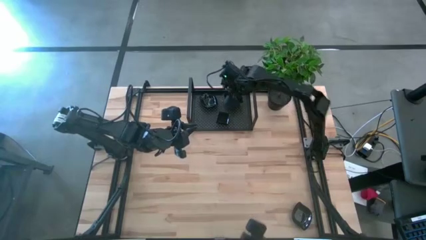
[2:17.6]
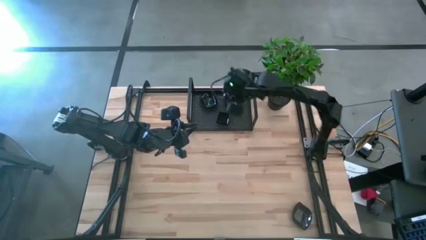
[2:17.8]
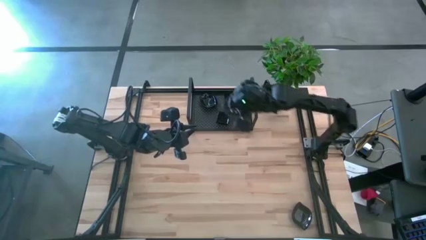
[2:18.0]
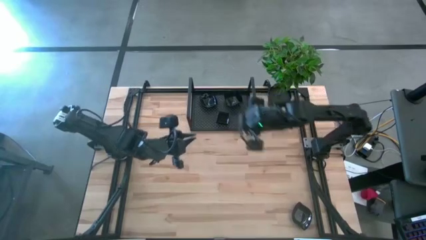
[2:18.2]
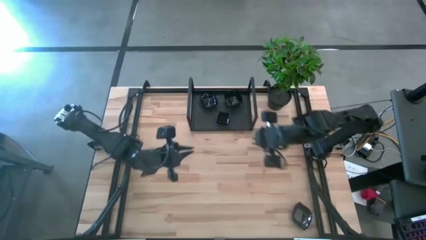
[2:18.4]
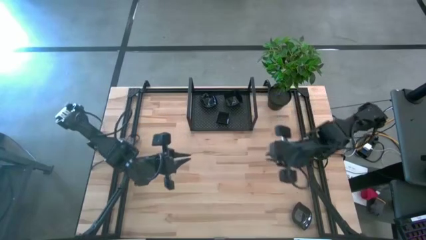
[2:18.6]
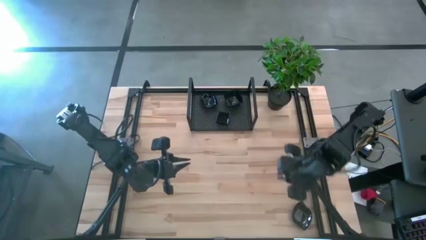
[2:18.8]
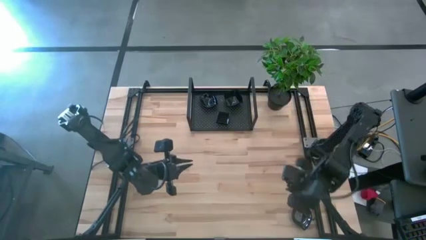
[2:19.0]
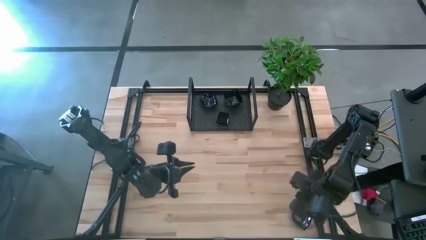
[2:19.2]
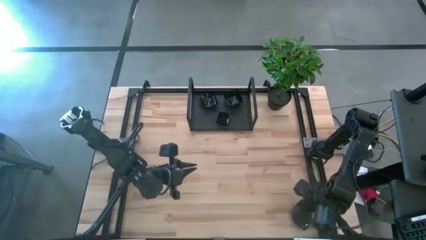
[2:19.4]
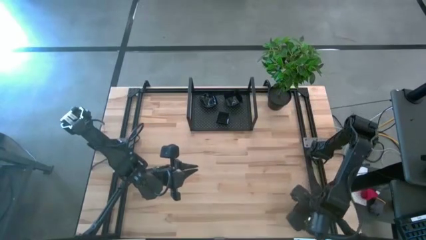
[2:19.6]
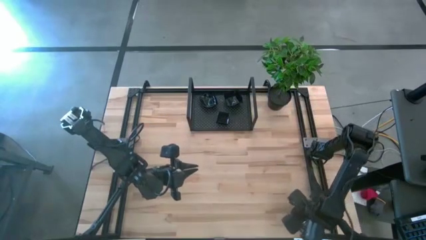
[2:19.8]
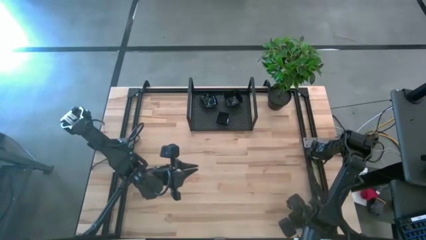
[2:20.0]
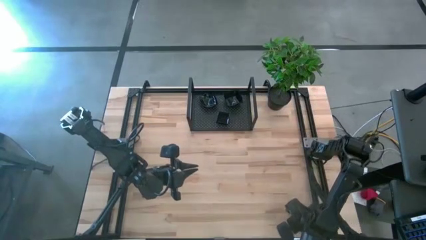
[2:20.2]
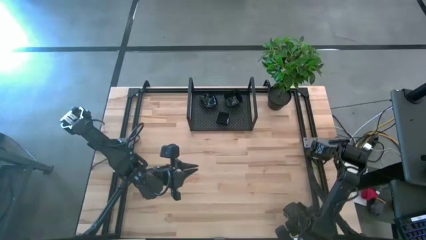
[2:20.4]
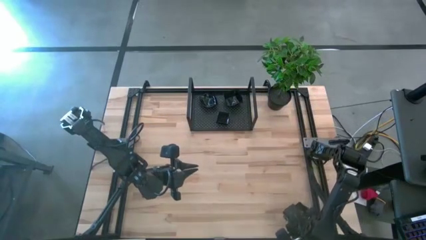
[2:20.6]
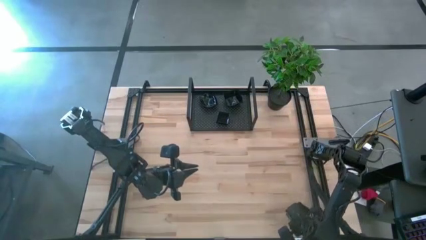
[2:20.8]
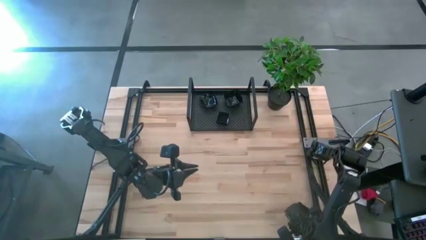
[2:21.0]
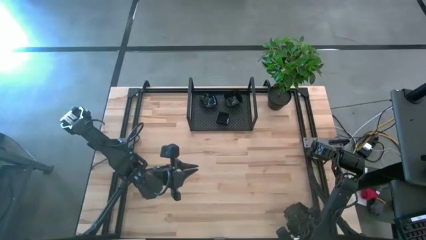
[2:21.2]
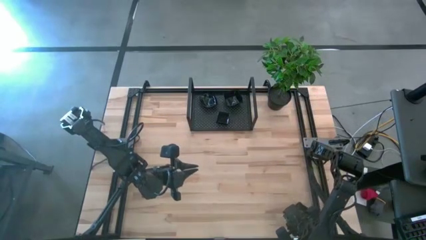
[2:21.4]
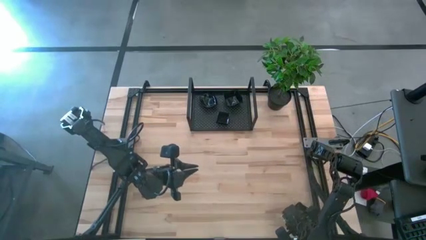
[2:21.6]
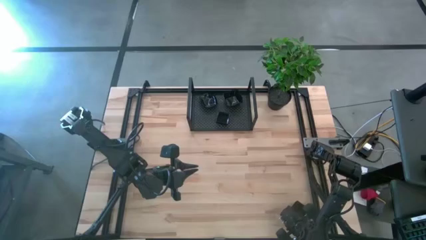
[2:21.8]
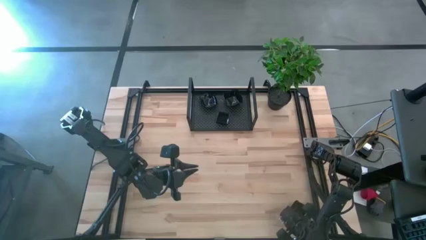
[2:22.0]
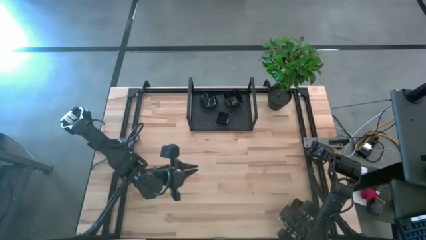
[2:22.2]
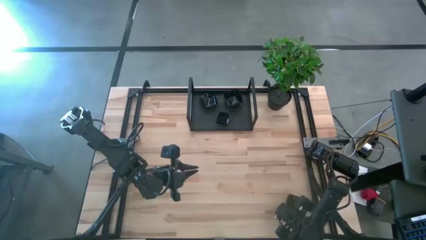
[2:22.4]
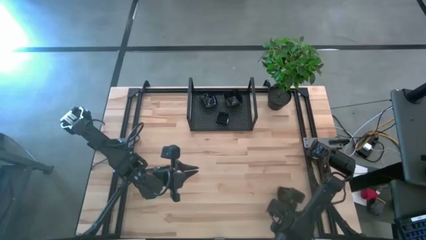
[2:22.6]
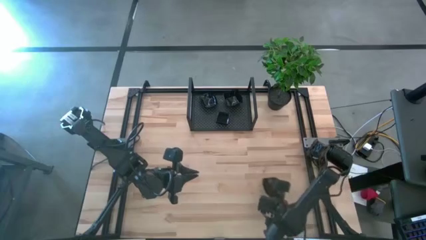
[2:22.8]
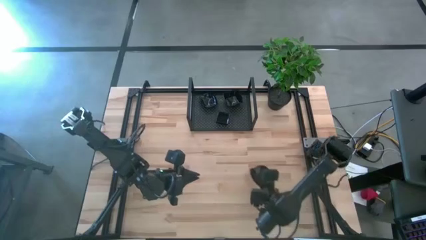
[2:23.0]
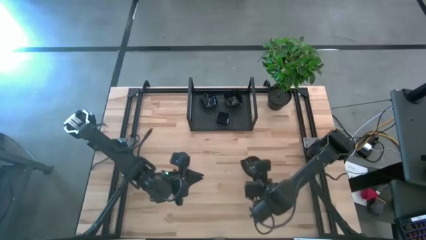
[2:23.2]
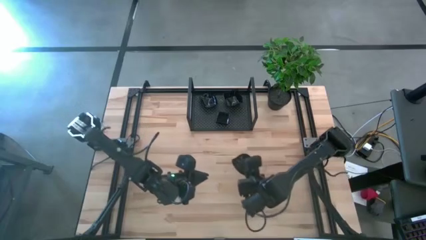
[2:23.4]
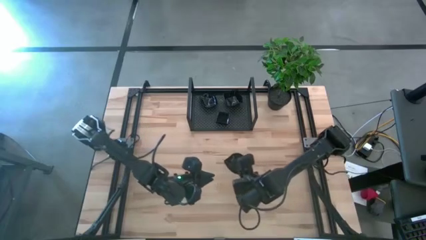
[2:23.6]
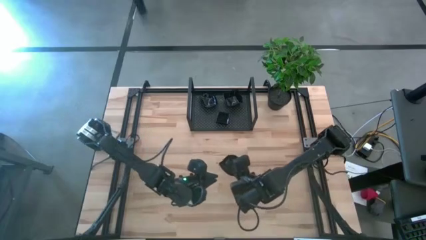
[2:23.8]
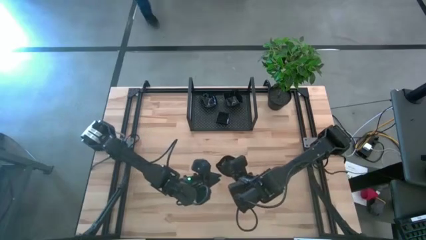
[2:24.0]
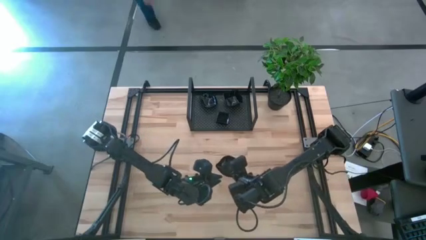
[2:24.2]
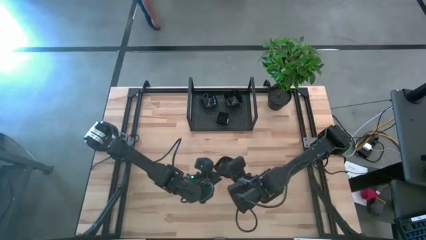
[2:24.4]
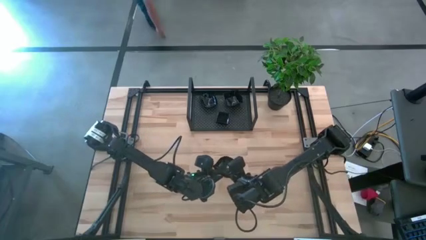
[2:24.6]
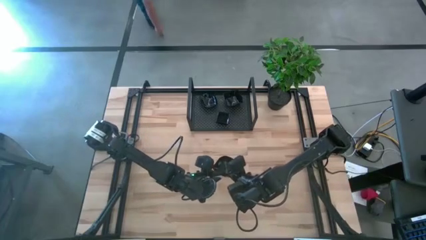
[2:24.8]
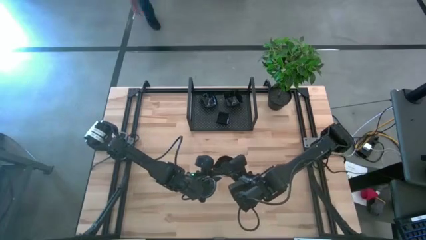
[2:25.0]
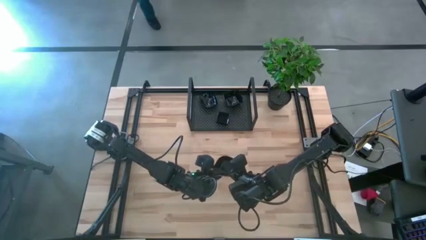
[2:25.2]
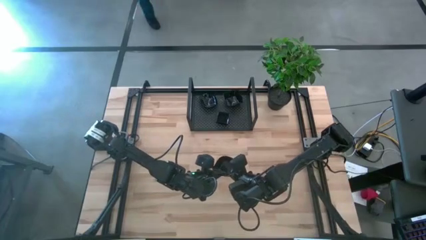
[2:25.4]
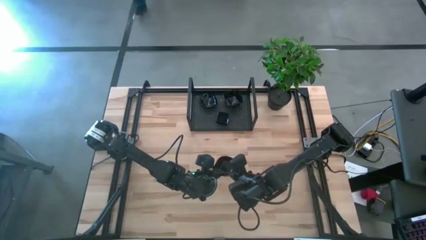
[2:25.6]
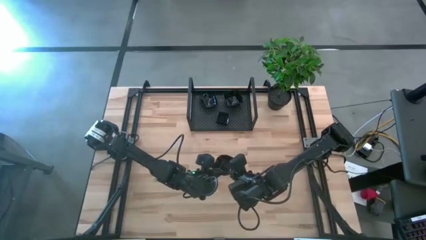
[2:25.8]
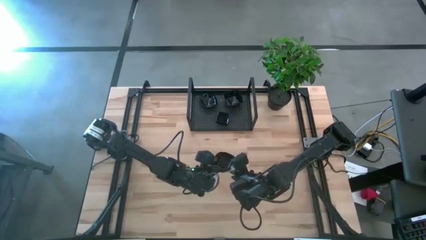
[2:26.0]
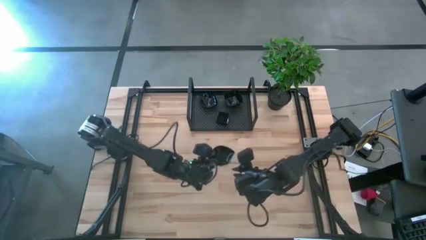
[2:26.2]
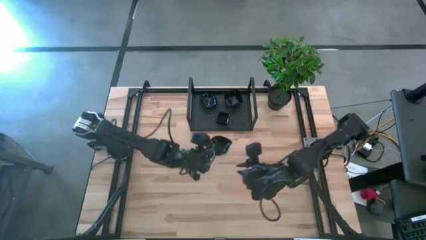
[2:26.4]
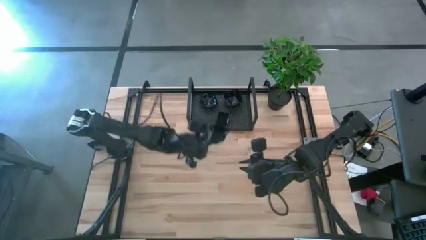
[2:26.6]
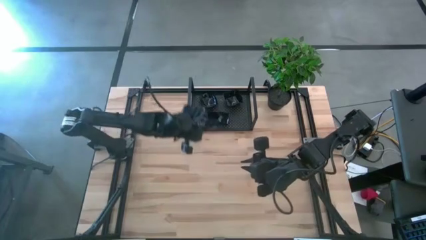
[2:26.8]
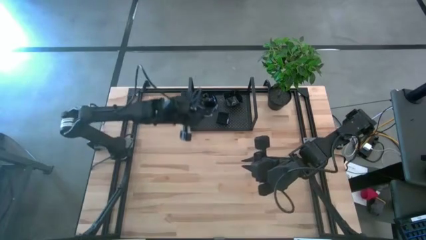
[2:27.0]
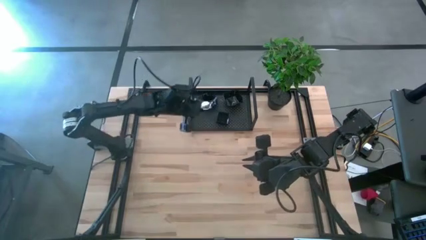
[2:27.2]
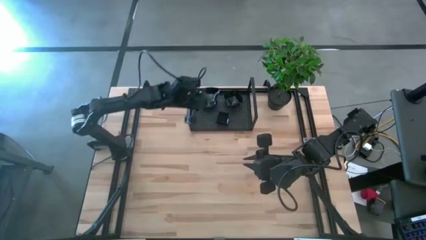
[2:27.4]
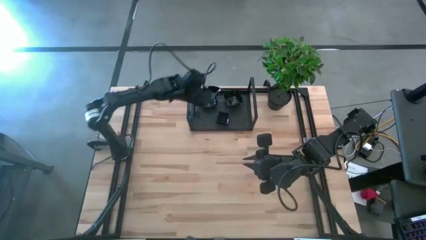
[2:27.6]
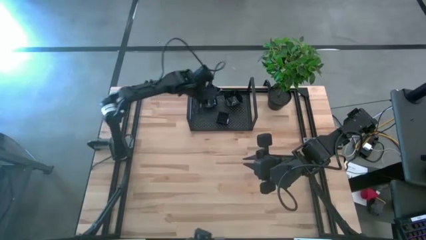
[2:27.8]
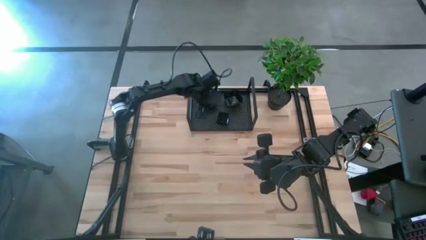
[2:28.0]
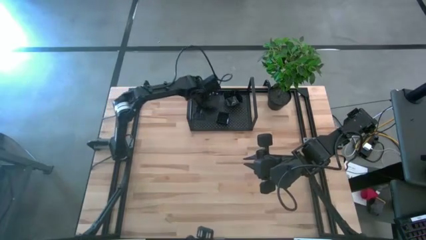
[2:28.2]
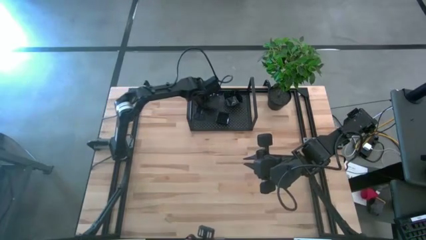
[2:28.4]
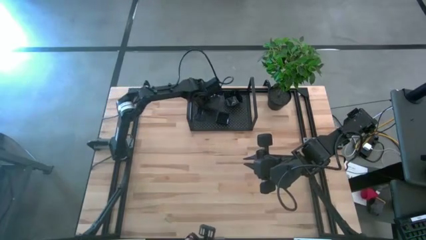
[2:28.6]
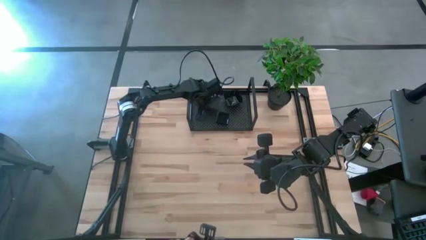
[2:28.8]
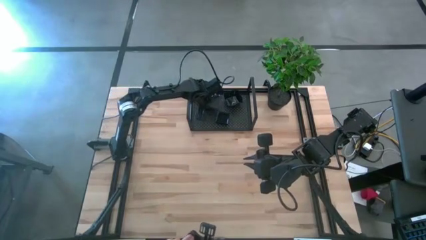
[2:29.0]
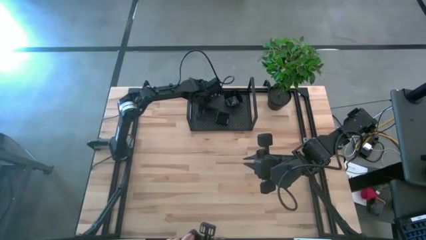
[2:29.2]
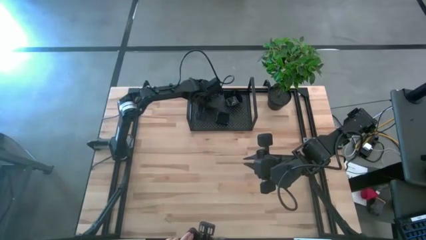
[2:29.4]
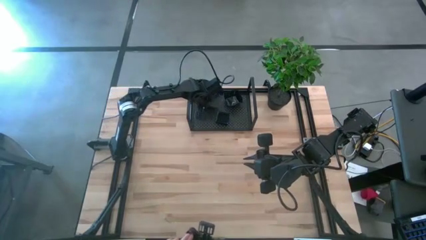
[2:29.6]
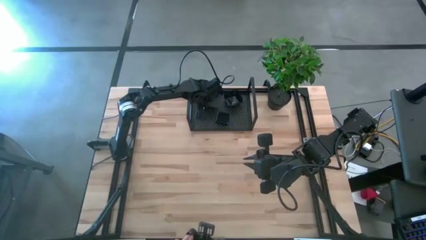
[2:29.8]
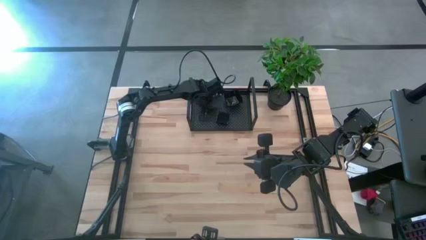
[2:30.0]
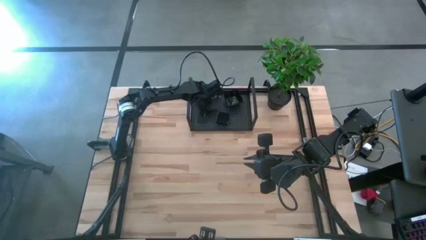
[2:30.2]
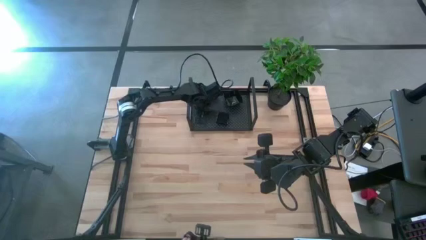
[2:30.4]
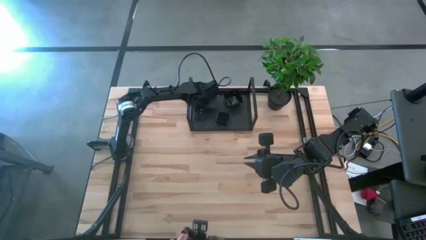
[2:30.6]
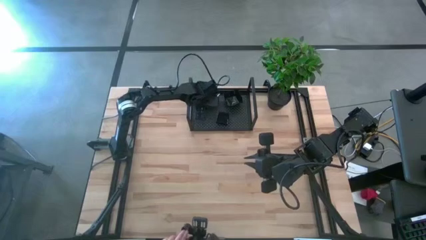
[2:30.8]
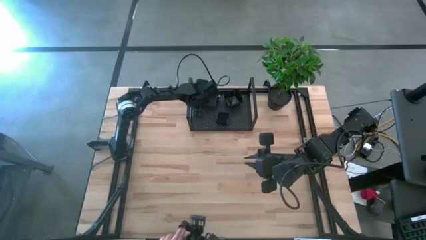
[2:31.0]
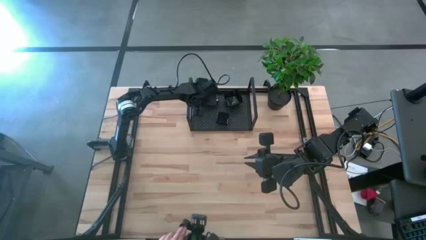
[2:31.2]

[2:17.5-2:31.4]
Task: Pick & Place Mini shaped plates
Stack the black leaf-shaped plate on top of the black leaf-shaped plate on the shelf

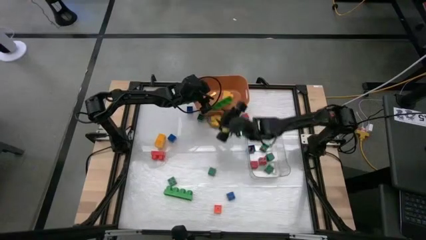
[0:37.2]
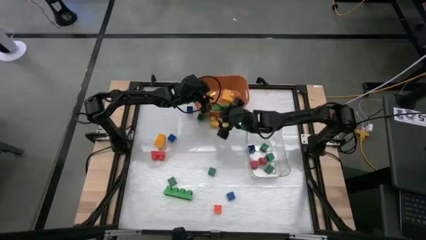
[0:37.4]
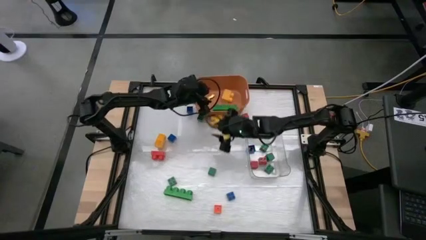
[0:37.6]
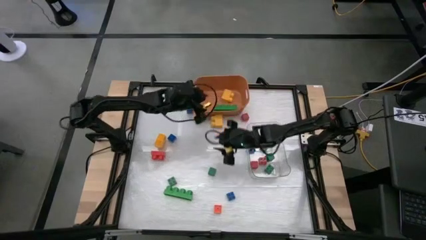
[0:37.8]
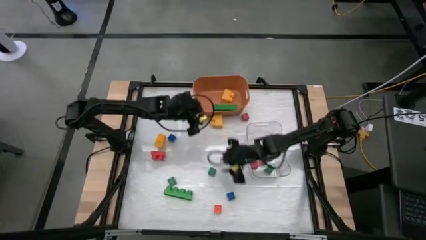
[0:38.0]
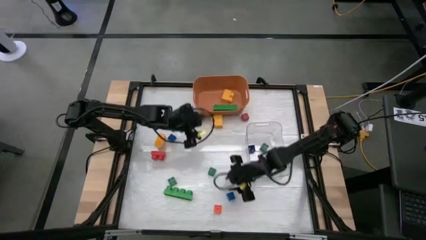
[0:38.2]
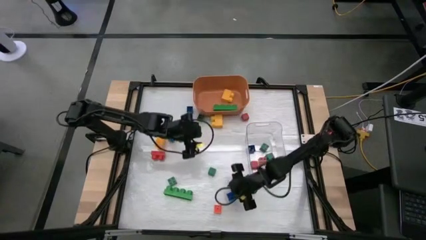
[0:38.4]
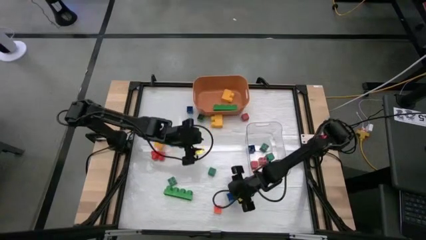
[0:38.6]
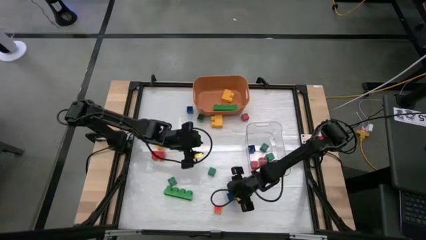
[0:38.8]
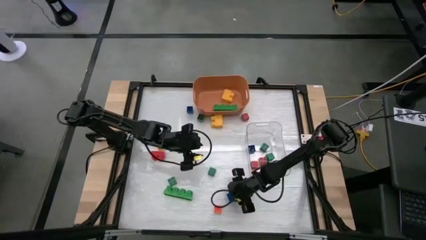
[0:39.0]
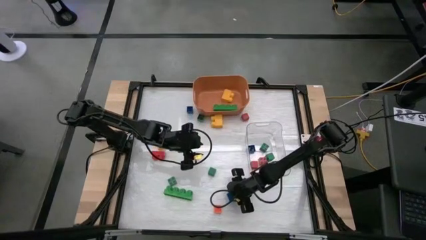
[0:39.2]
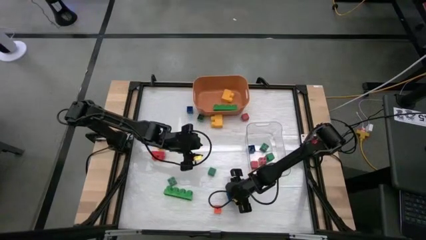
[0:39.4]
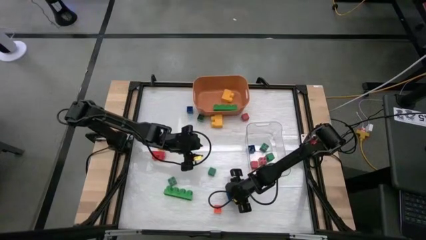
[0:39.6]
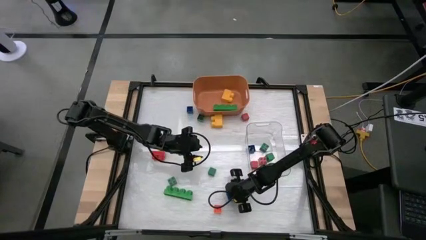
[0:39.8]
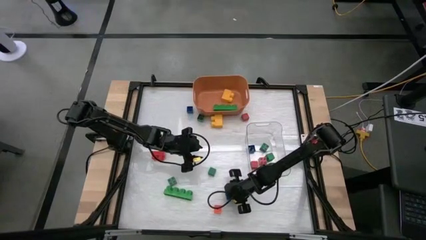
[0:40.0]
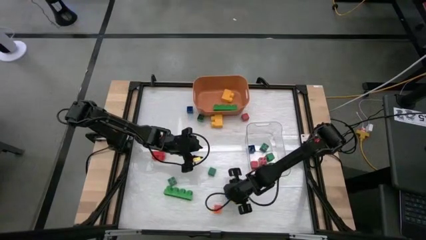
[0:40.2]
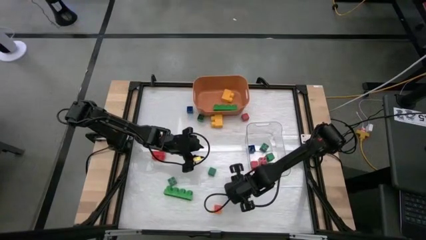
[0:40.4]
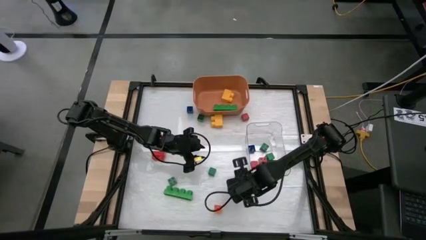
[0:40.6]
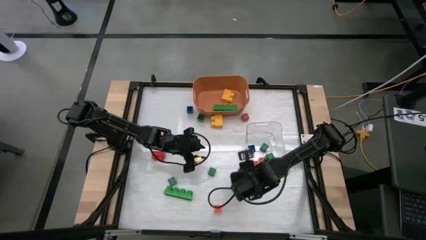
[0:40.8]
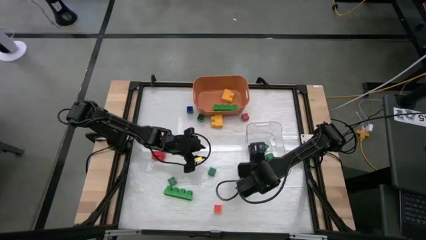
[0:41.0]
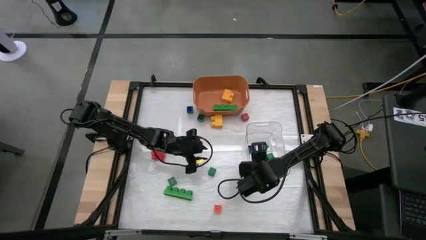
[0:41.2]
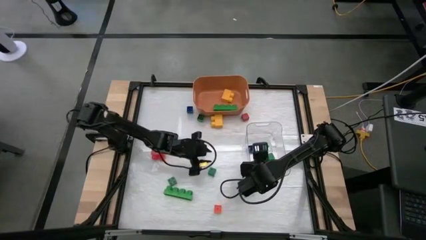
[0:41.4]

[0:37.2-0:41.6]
Task: Sort blocks by size
Put the small blue game piece into the transparent bin
